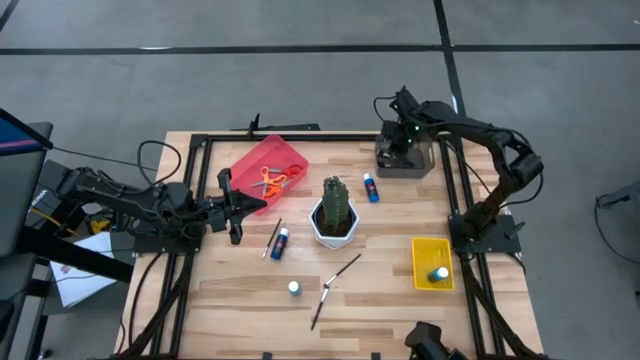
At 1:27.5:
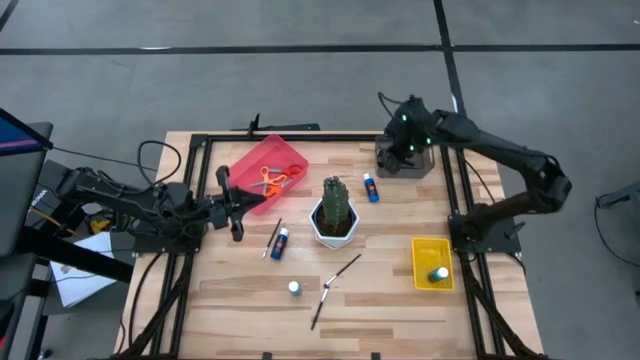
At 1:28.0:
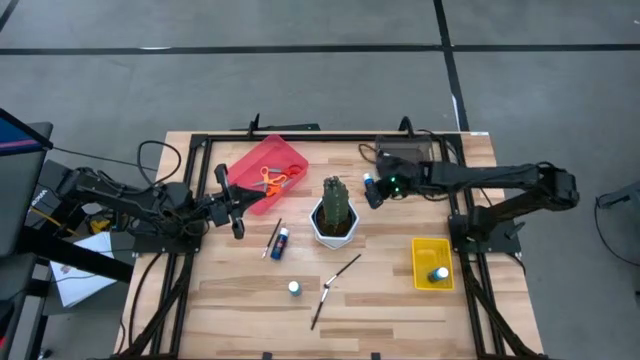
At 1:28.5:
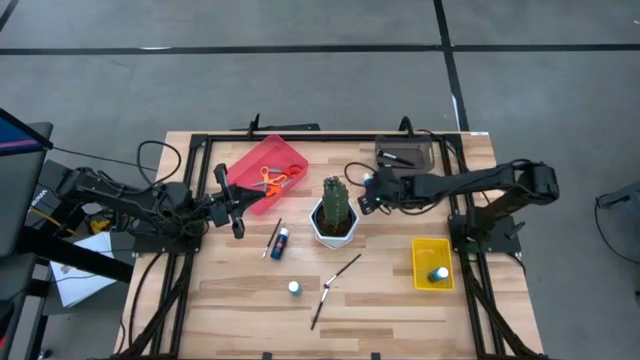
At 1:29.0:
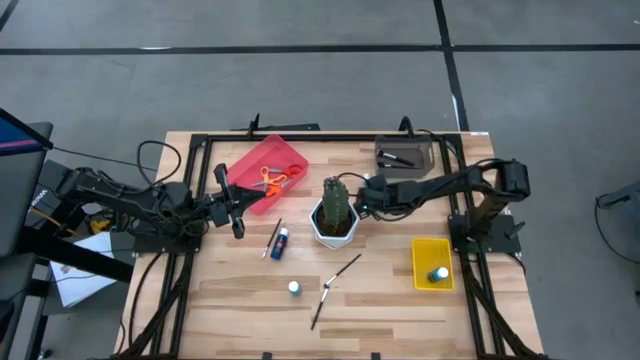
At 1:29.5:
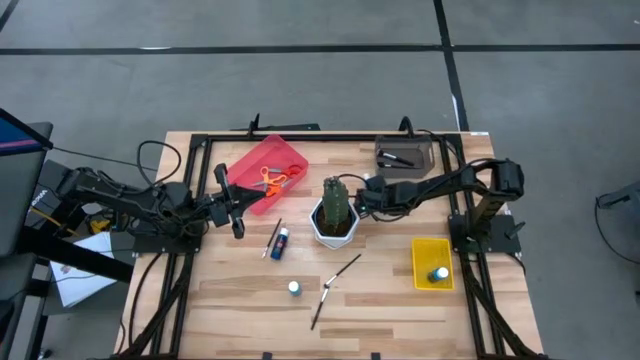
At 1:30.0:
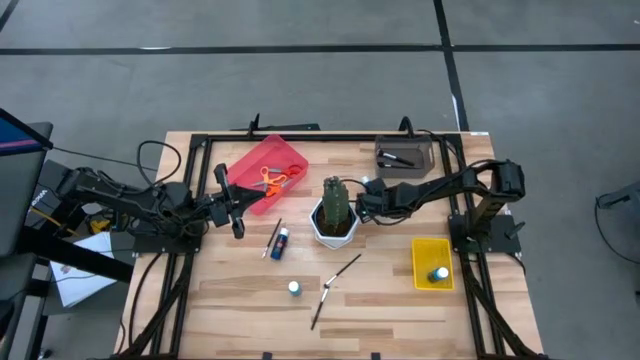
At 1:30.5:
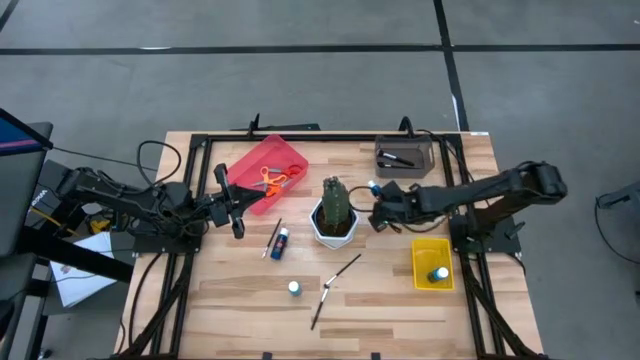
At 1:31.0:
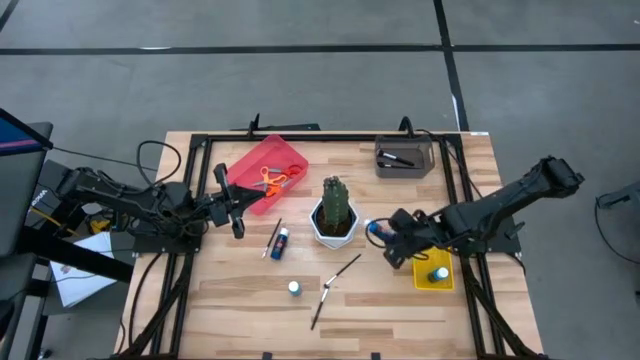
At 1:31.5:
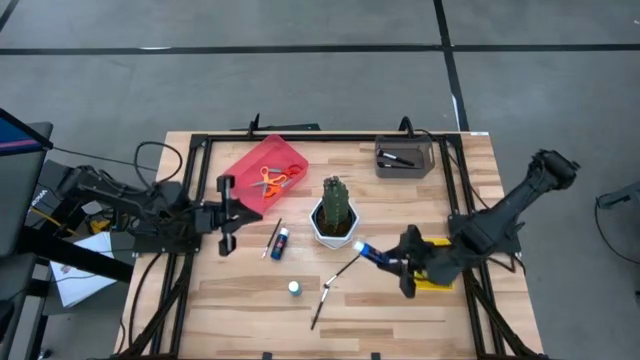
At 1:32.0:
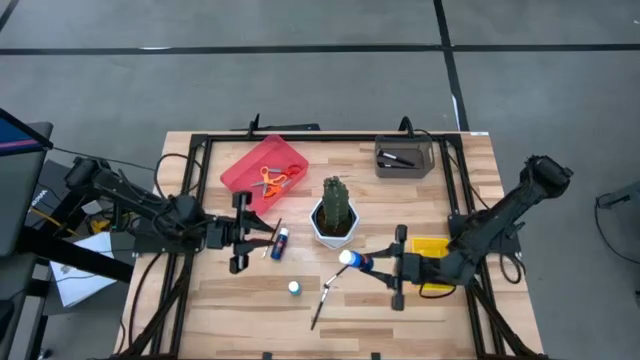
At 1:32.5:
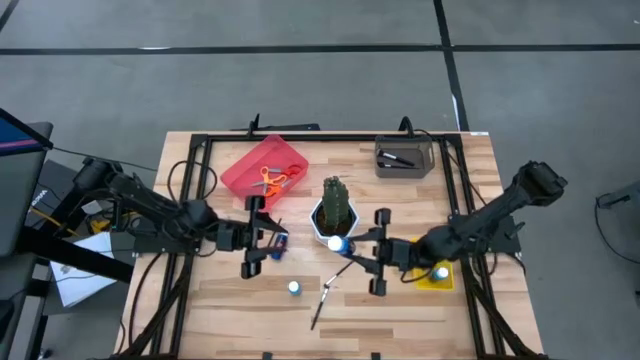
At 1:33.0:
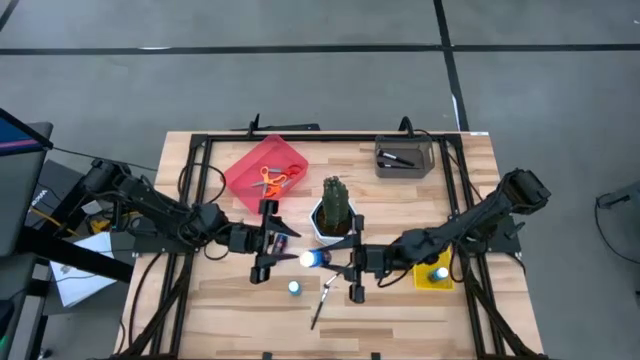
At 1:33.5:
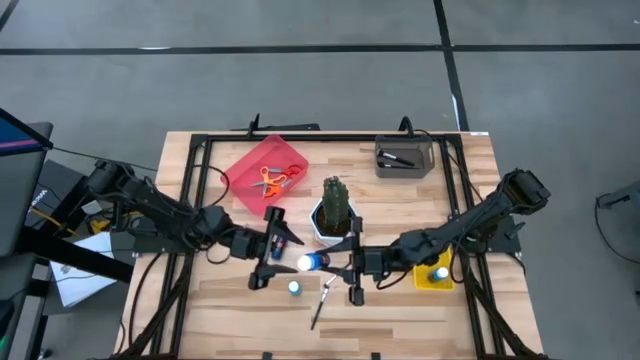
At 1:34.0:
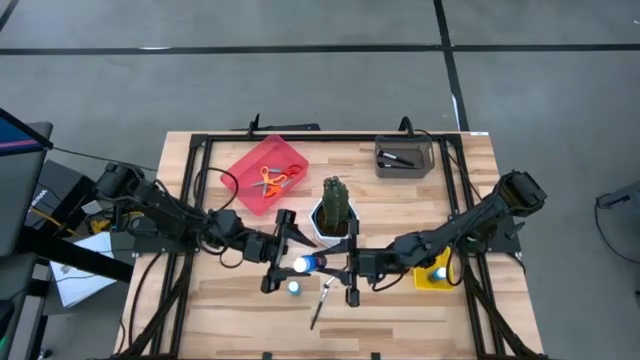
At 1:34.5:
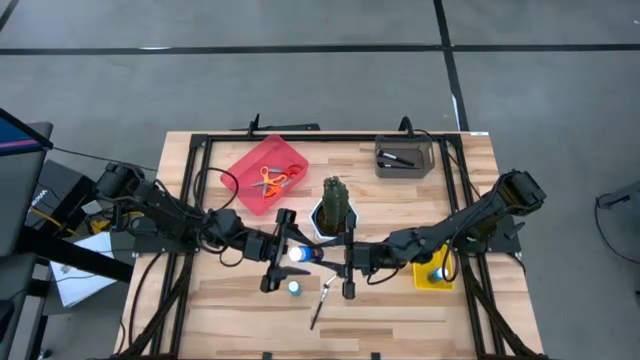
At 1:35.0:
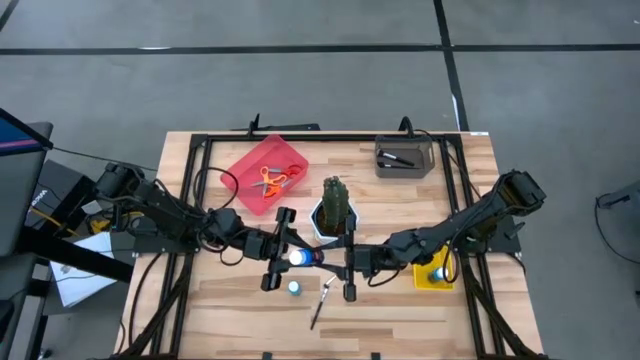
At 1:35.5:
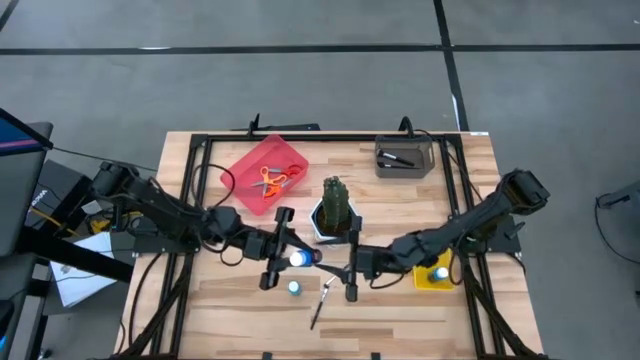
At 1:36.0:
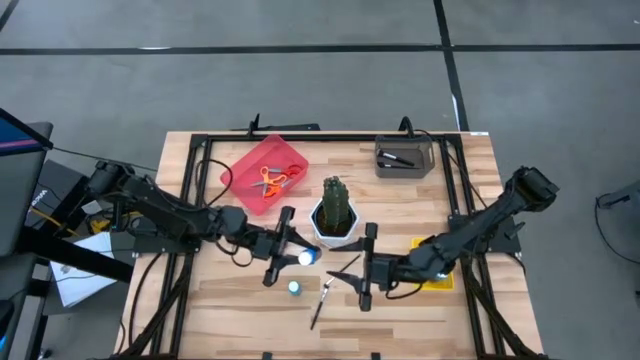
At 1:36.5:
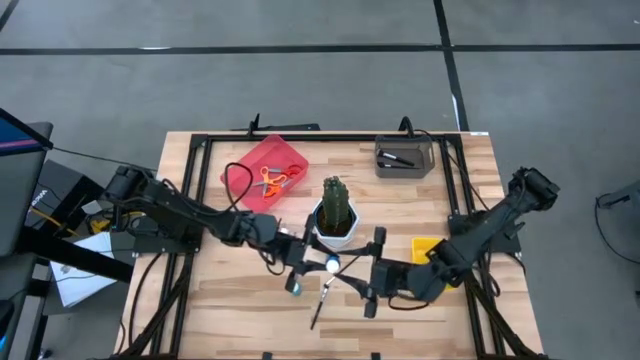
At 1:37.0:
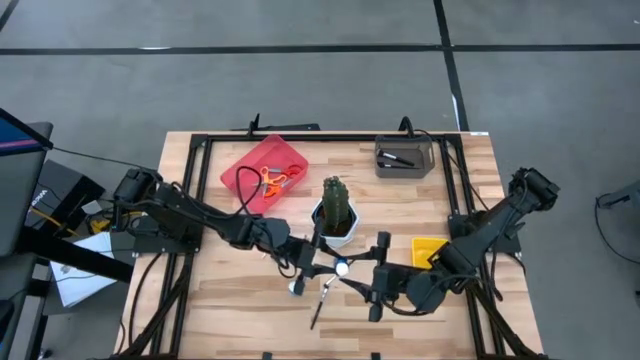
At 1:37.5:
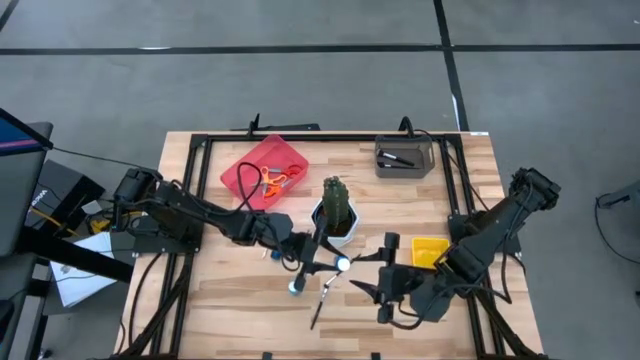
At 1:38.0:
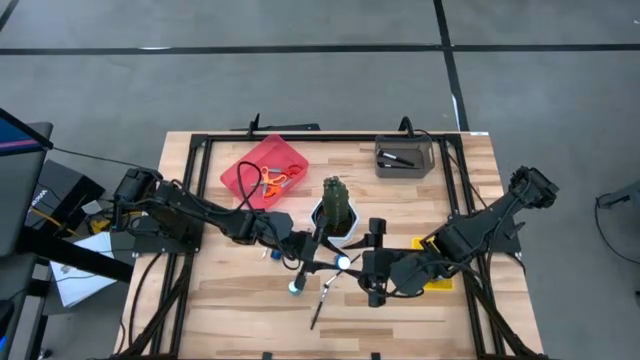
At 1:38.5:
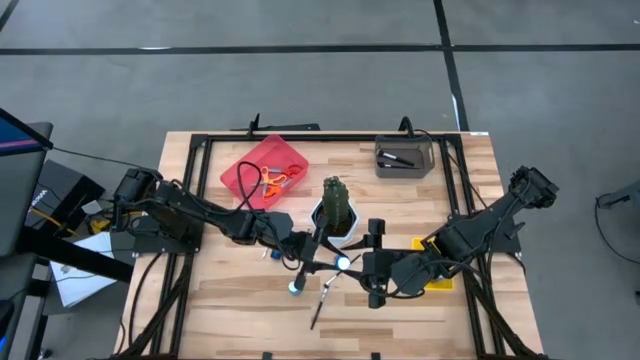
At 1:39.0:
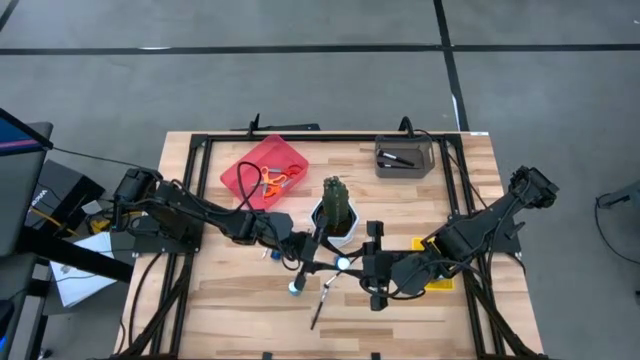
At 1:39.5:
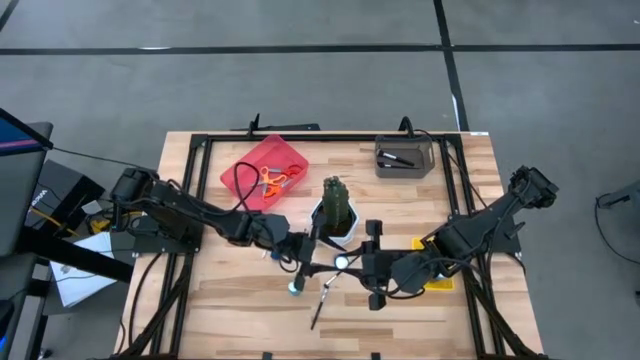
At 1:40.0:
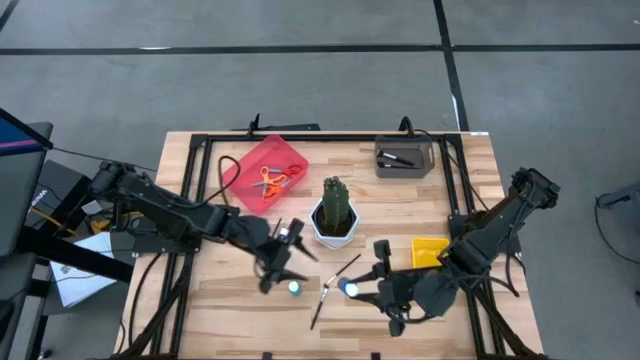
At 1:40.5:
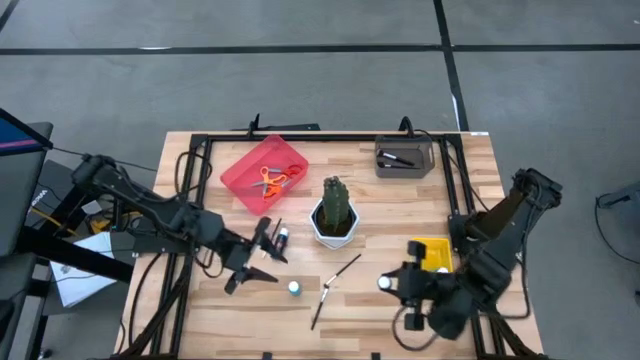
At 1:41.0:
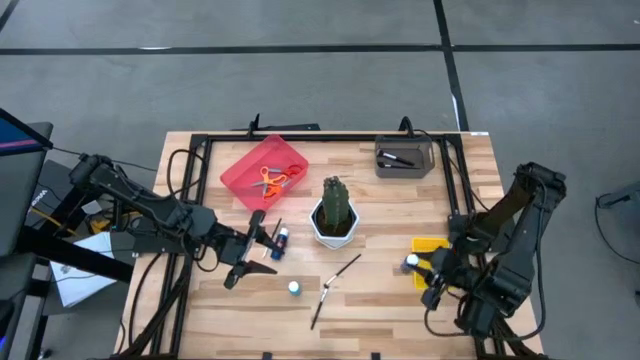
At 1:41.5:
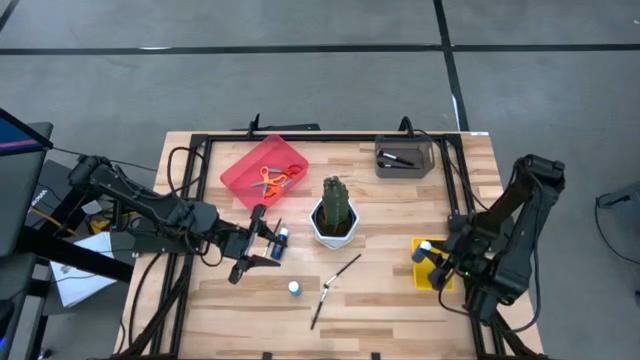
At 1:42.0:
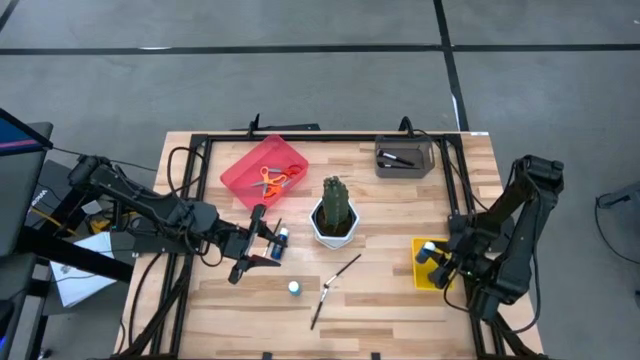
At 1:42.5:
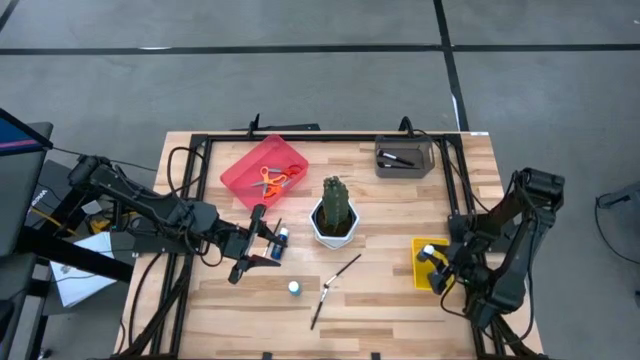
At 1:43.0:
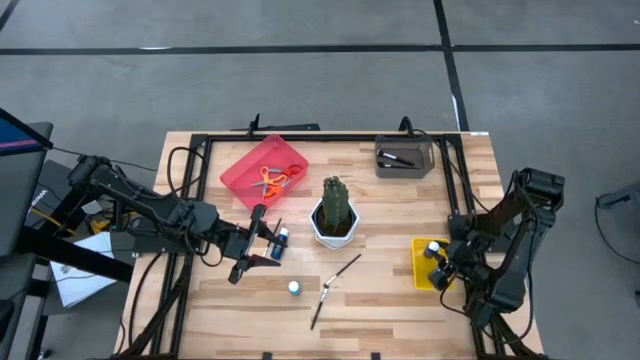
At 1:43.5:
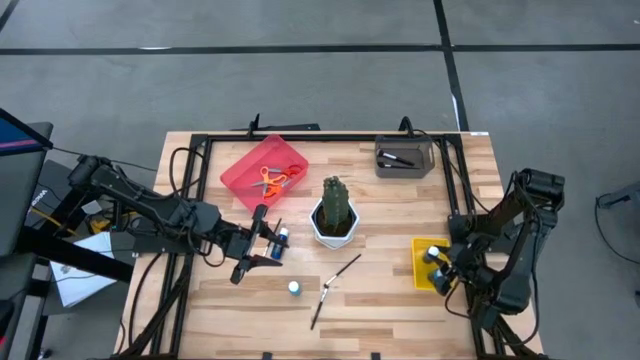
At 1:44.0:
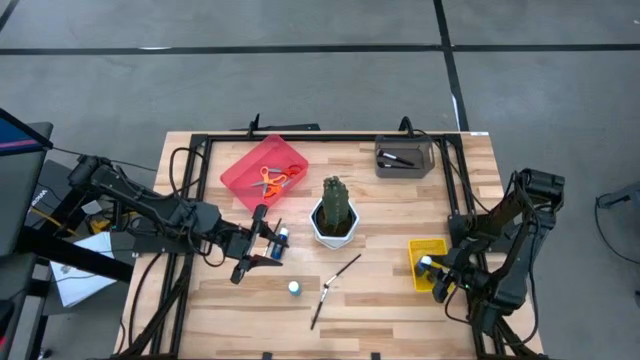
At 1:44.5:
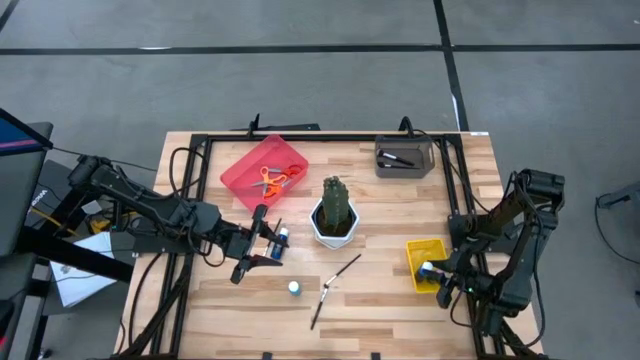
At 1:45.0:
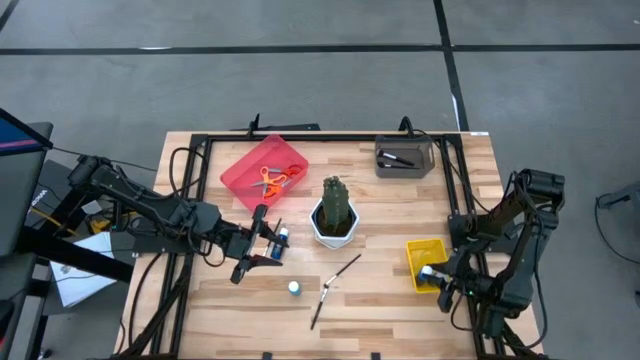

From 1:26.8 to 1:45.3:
Task: Pick & Place Paint Supplies
Put the right blue paint bottle into the yellow basket

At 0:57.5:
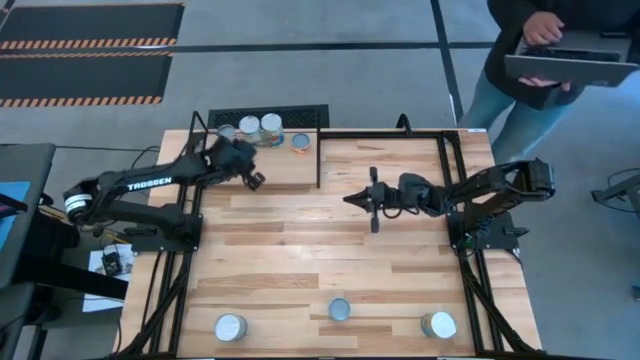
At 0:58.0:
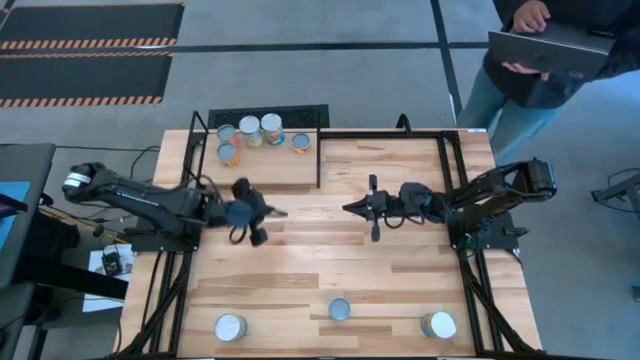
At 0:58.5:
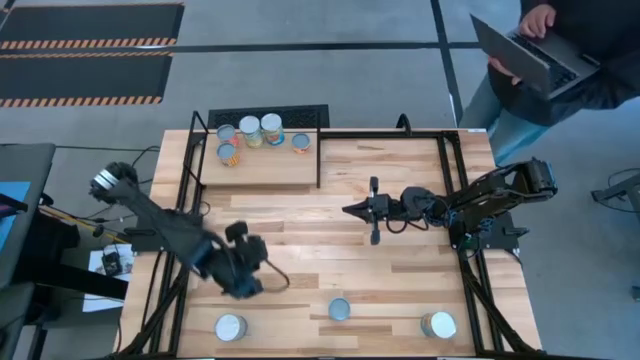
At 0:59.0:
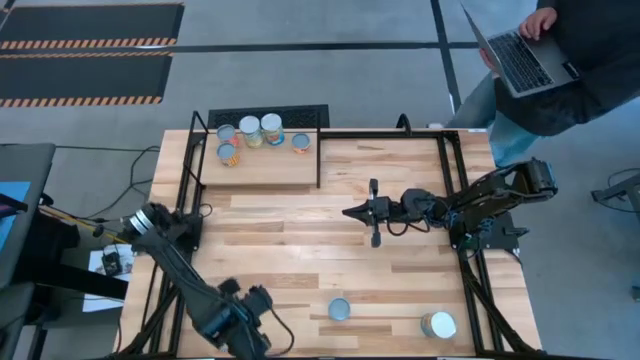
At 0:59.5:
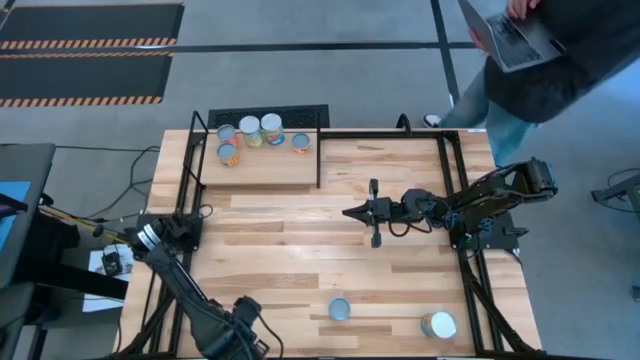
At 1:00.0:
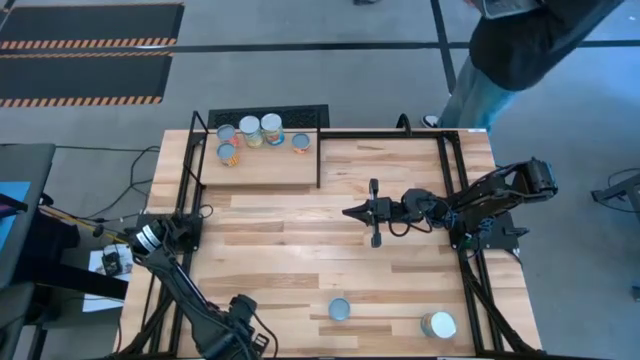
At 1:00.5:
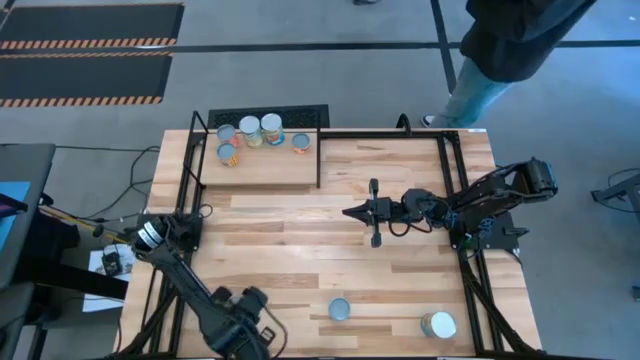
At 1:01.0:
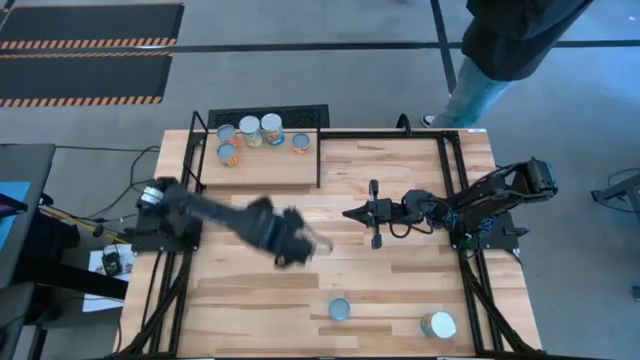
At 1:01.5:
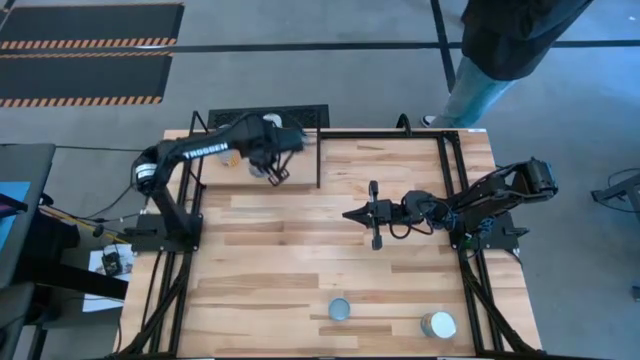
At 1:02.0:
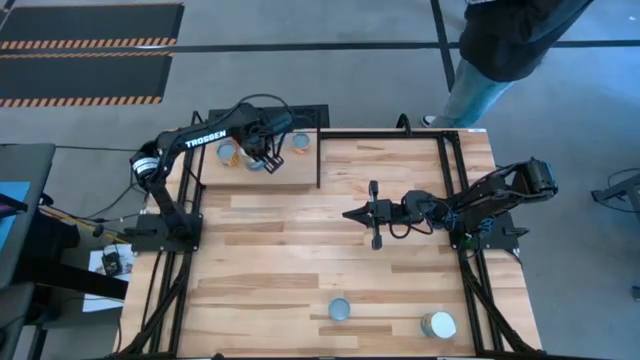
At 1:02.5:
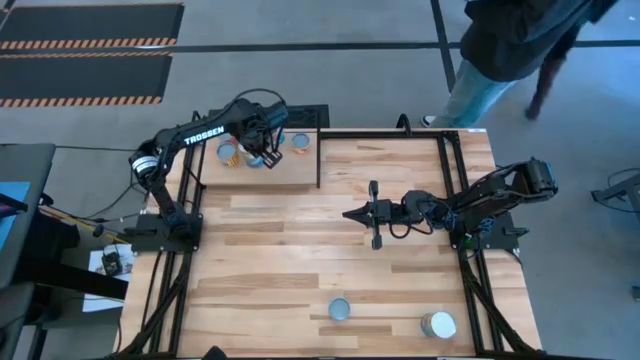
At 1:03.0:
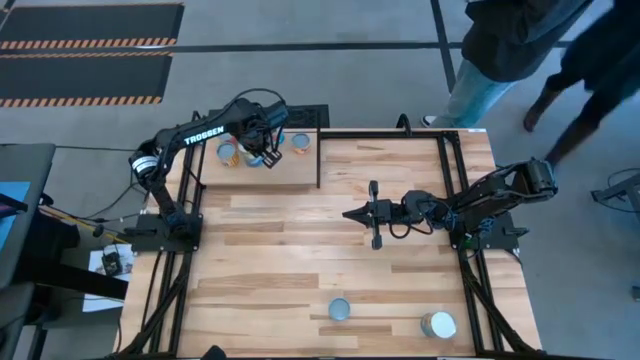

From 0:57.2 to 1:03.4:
Task: Pick and place cans onto a shelf
Put the large canned peas on the shelf aligned with the other large canned carrots
